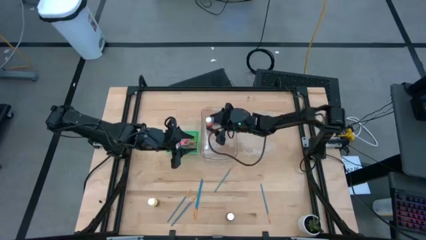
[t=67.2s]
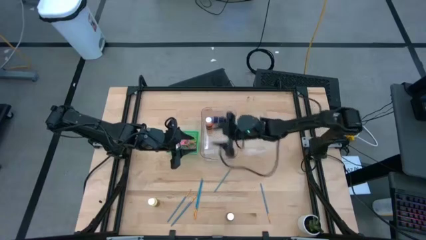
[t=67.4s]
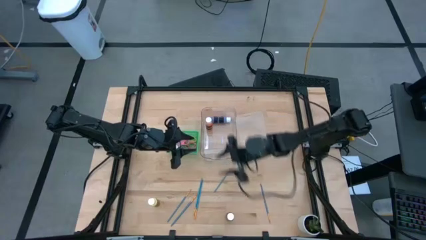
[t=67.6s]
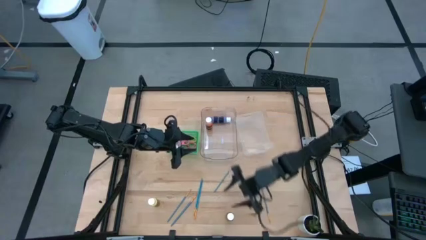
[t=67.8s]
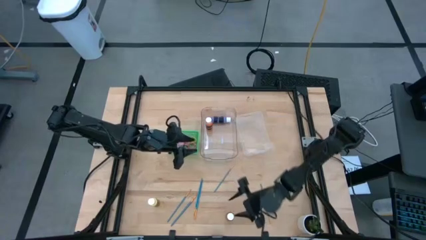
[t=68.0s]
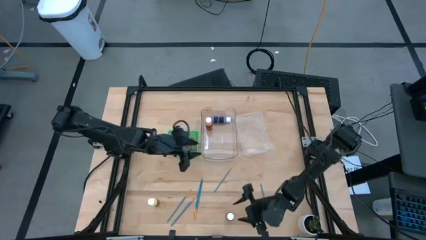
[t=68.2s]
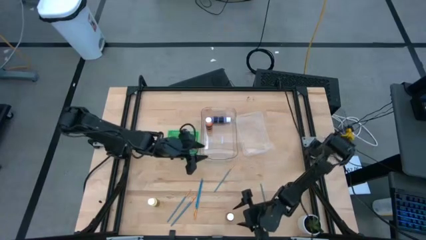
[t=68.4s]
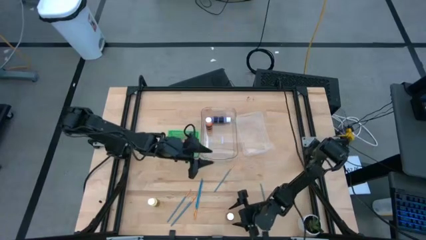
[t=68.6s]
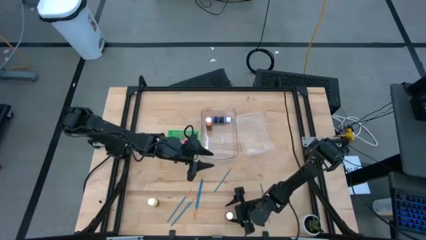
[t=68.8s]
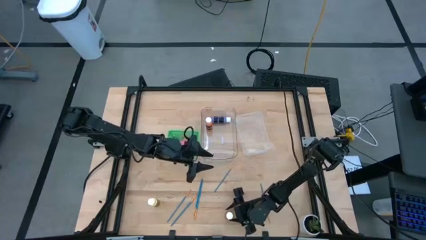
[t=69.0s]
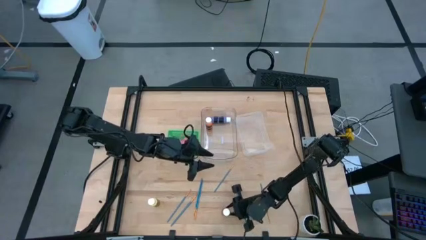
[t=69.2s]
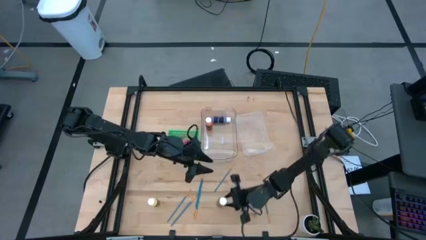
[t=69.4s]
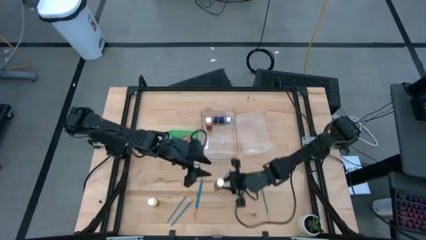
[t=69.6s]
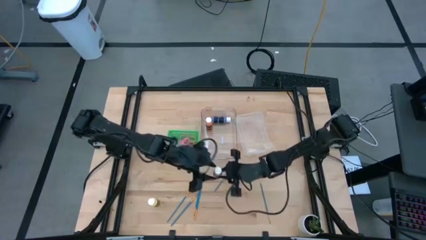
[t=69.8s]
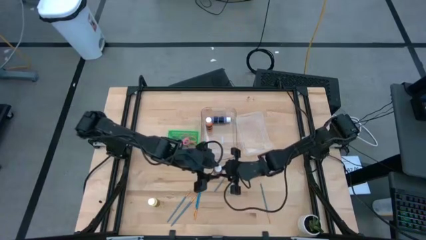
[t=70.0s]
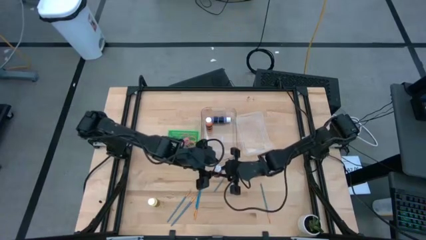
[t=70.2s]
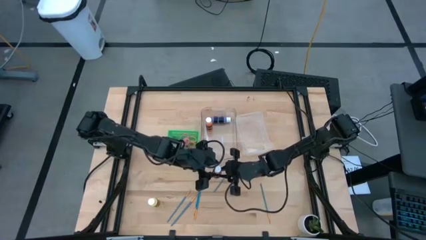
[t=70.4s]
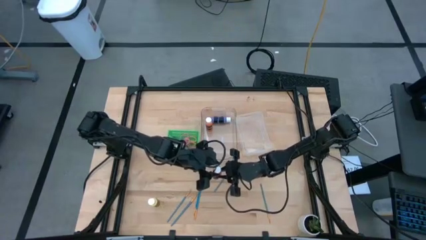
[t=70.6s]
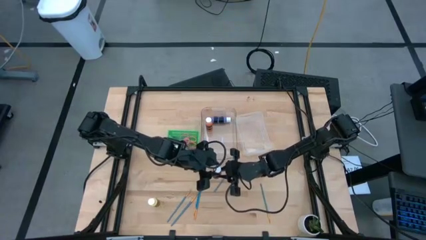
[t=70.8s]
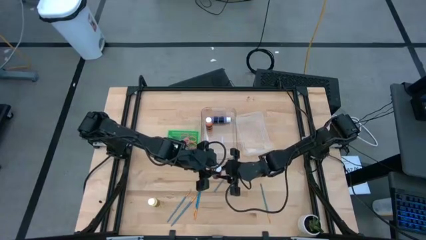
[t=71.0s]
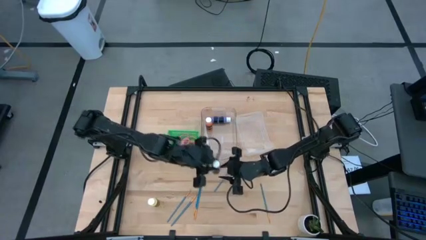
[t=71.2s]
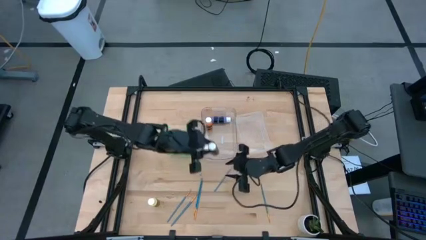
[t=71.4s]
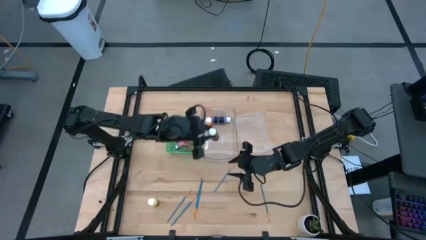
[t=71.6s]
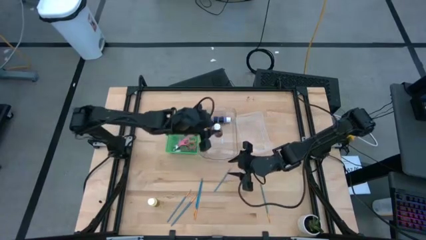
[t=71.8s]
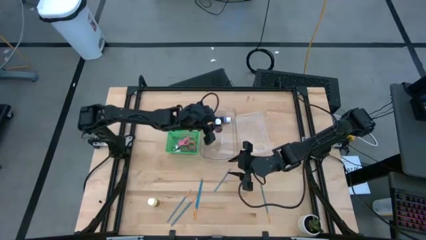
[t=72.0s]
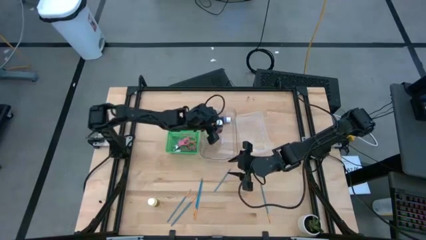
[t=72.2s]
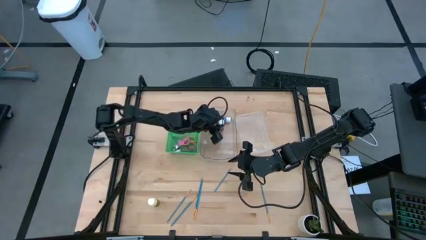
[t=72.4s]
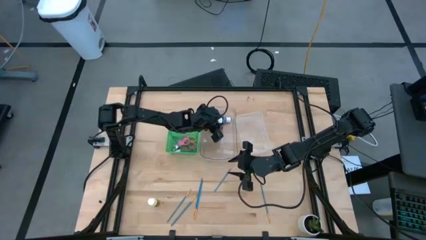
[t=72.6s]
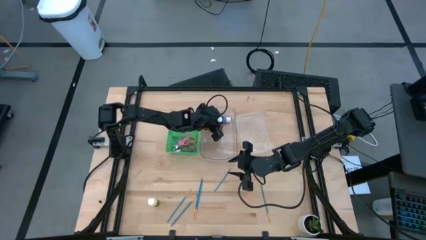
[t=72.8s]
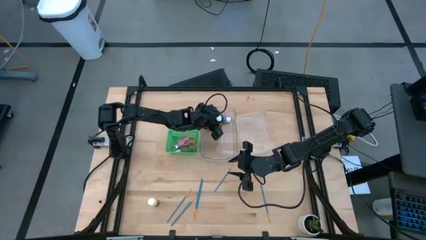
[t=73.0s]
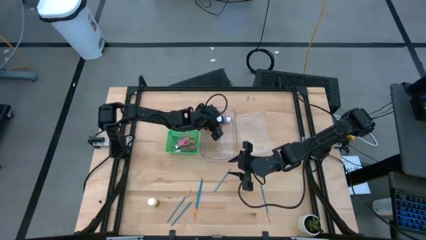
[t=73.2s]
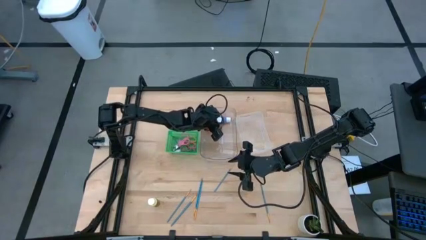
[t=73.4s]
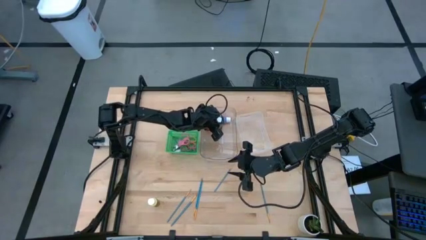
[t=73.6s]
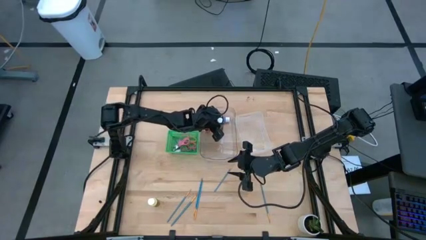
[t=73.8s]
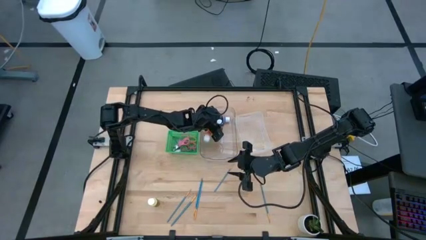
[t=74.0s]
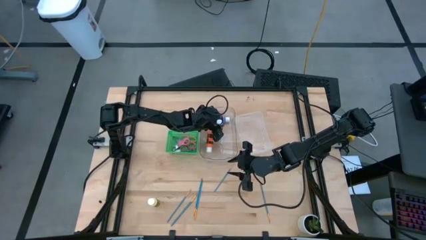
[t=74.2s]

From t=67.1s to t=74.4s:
Task: Pick & Place Paint Supplies
Put the brown paint bottle into the transparent bin

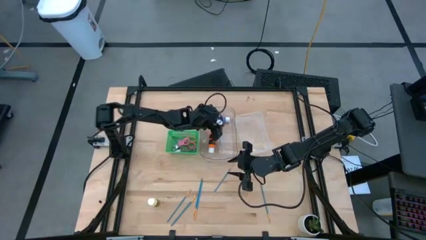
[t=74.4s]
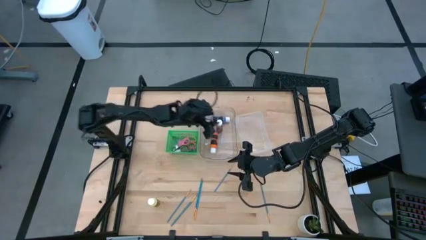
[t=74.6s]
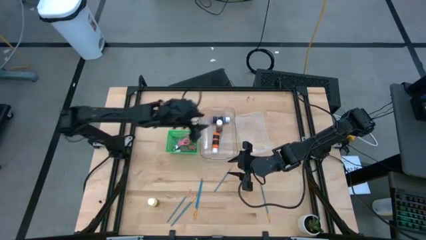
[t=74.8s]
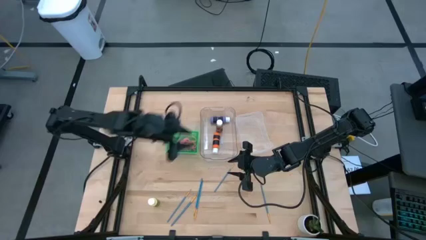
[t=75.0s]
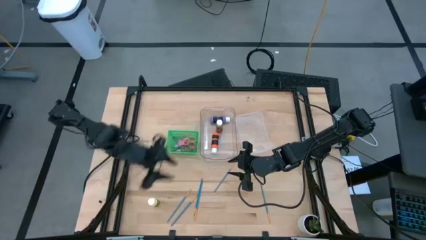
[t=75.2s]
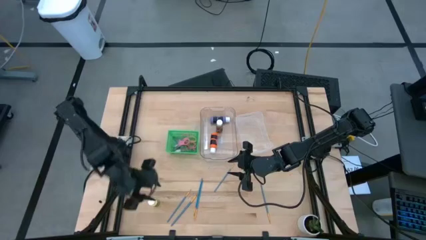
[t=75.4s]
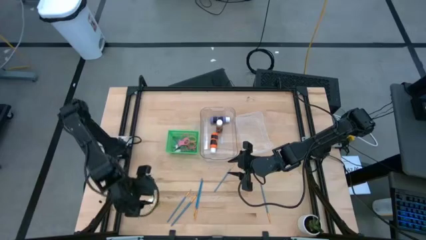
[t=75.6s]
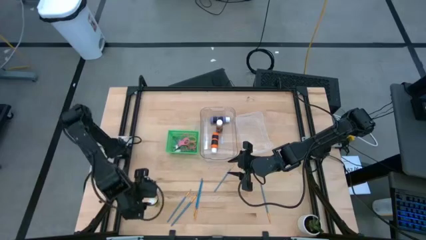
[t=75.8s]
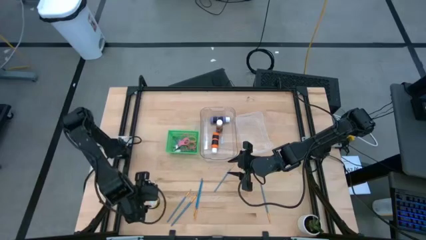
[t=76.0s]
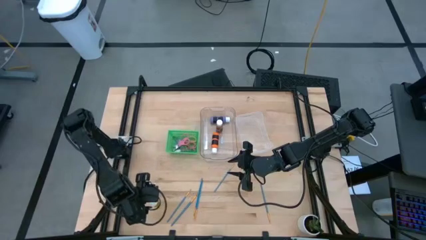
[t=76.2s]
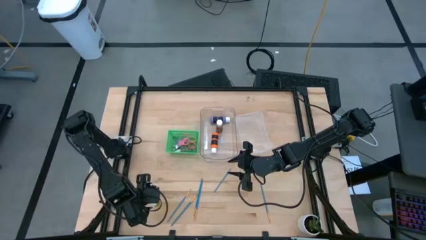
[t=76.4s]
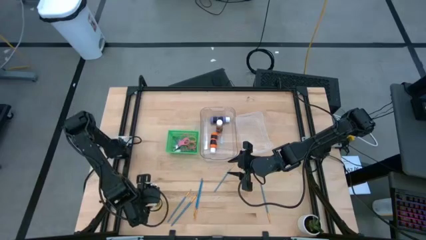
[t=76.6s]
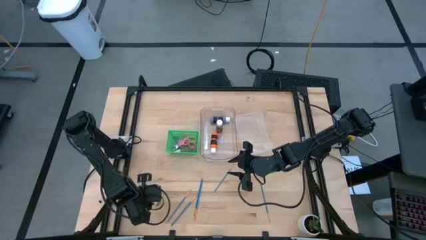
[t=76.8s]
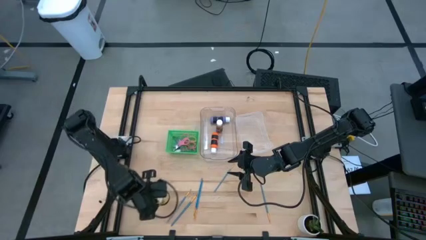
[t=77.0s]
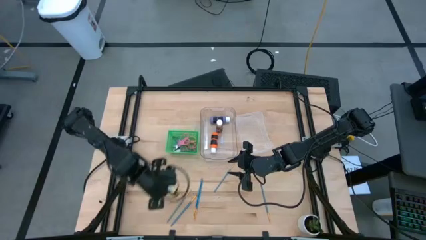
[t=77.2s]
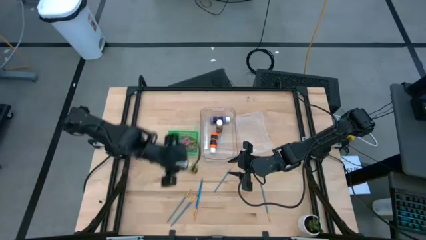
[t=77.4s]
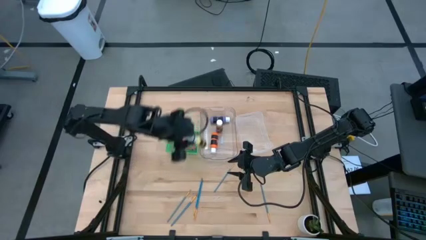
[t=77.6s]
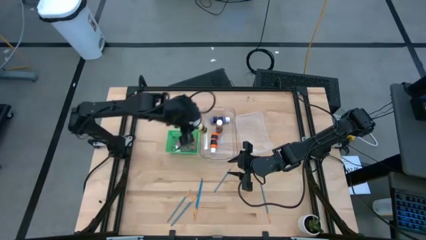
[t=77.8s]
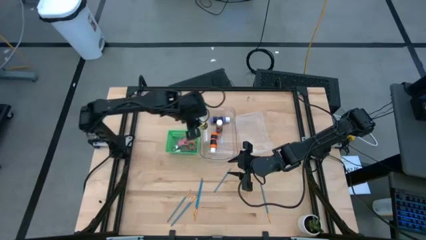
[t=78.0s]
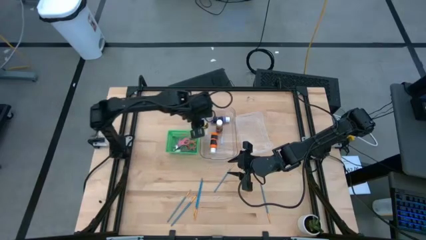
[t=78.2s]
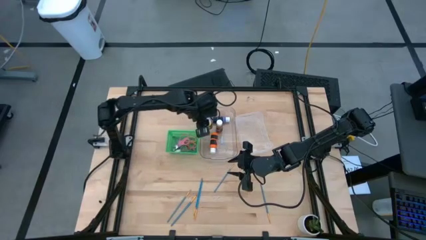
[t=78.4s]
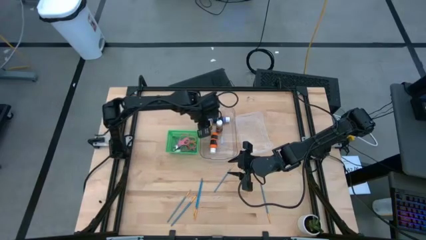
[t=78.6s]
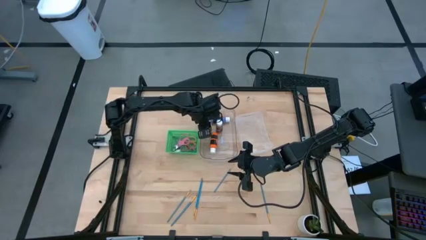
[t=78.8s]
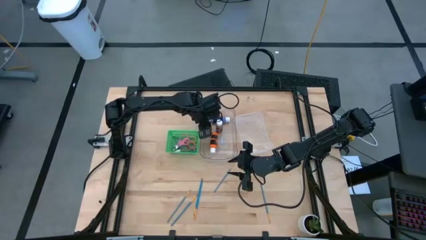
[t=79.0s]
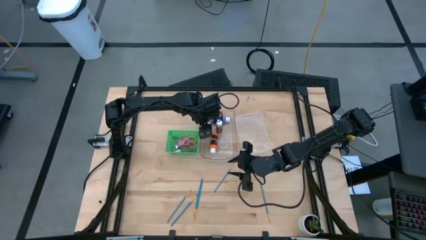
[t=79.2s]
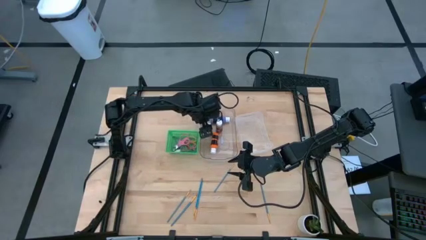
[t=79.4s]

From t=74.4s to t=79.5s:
Put the yellow paint bottle into the transparent bin

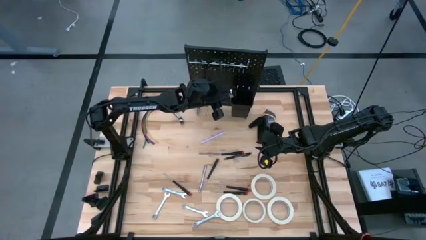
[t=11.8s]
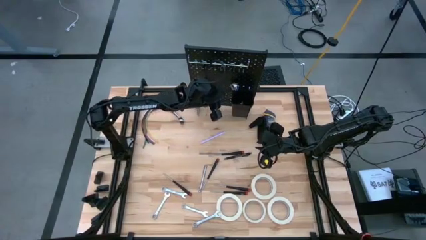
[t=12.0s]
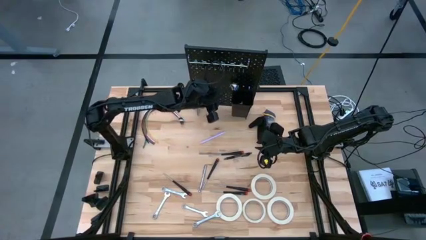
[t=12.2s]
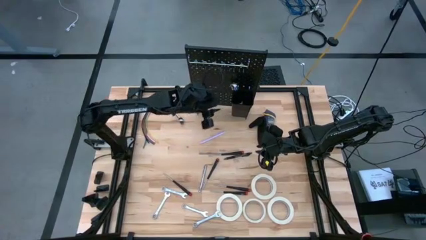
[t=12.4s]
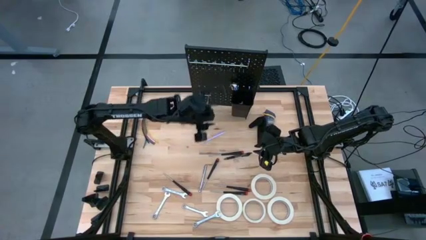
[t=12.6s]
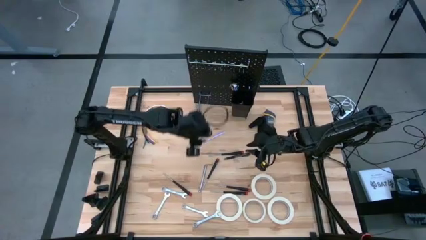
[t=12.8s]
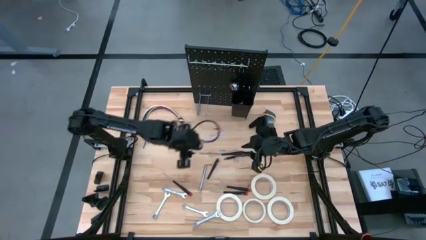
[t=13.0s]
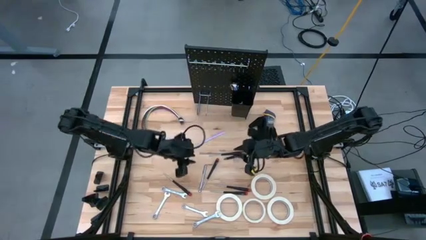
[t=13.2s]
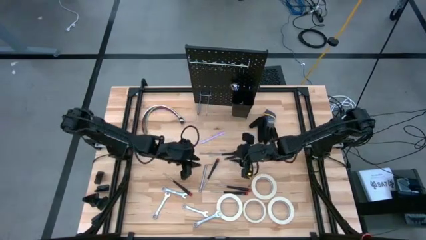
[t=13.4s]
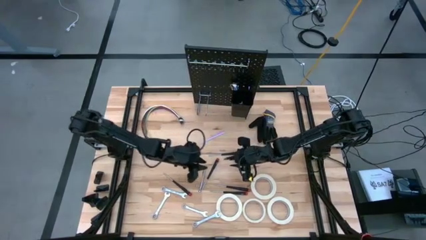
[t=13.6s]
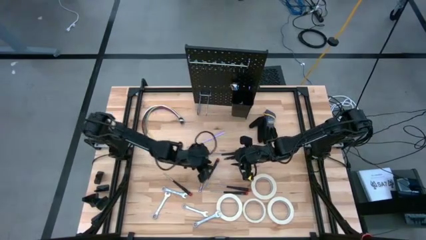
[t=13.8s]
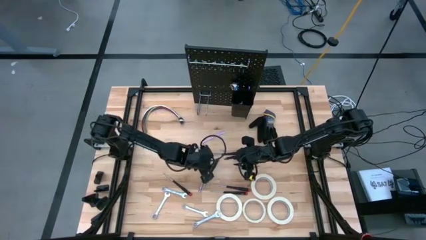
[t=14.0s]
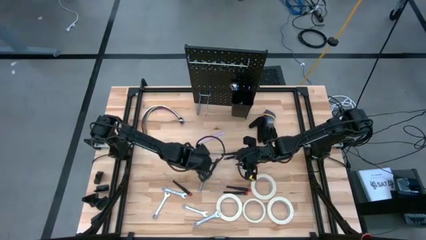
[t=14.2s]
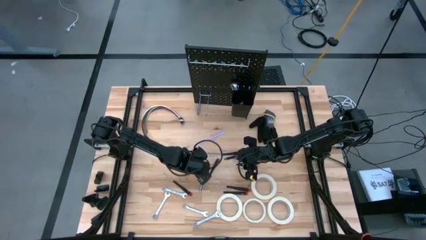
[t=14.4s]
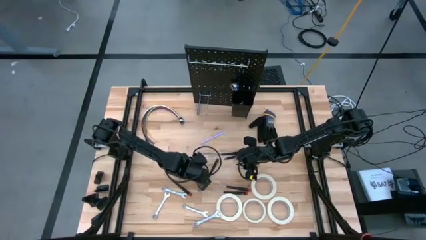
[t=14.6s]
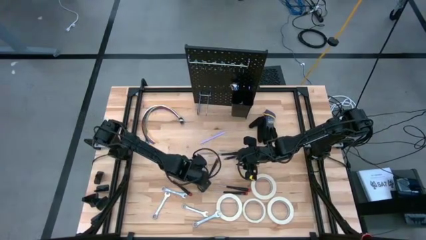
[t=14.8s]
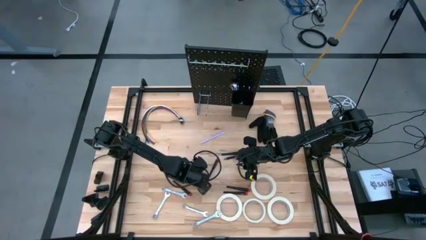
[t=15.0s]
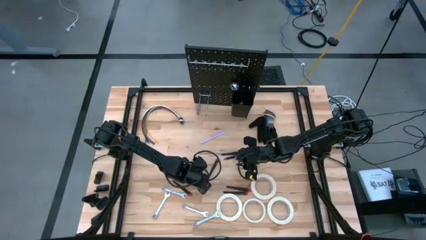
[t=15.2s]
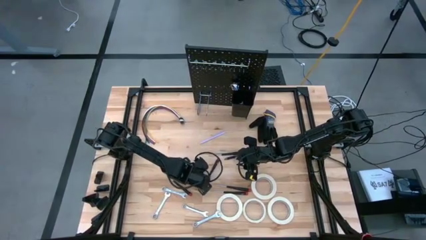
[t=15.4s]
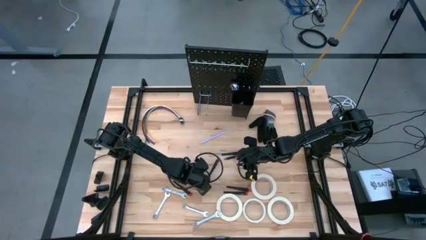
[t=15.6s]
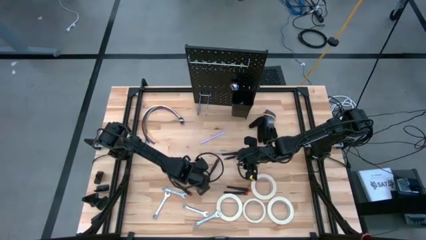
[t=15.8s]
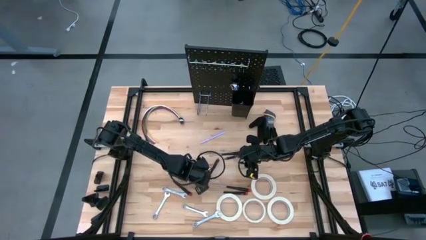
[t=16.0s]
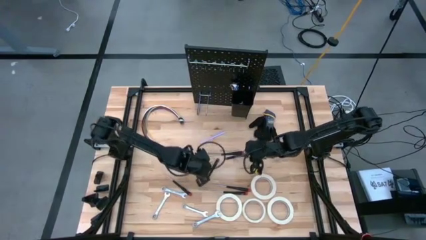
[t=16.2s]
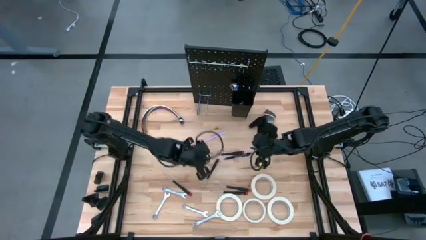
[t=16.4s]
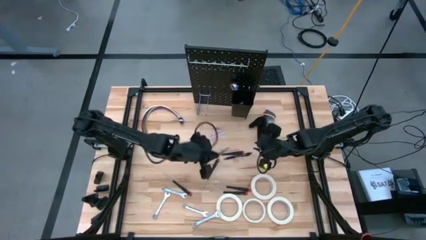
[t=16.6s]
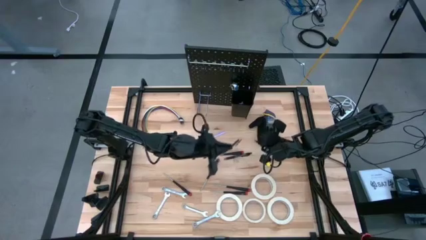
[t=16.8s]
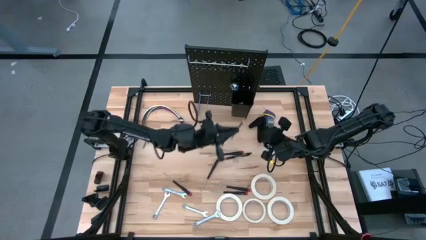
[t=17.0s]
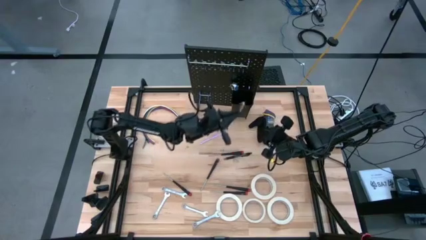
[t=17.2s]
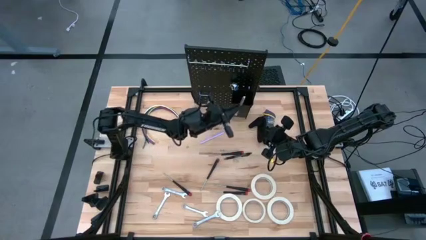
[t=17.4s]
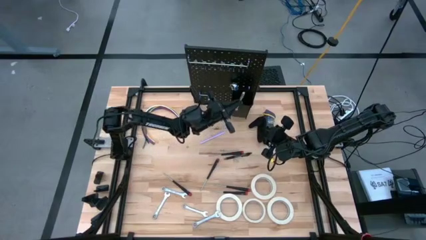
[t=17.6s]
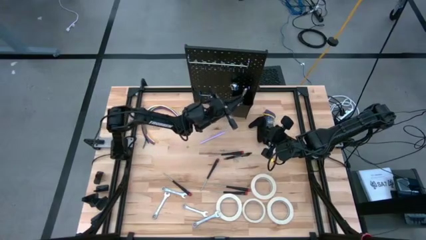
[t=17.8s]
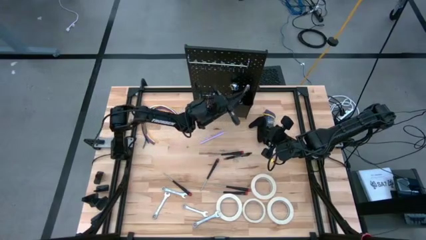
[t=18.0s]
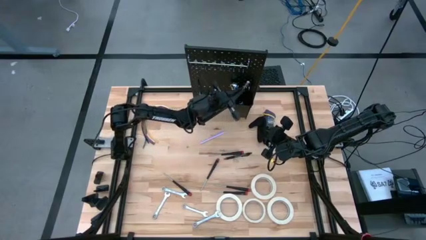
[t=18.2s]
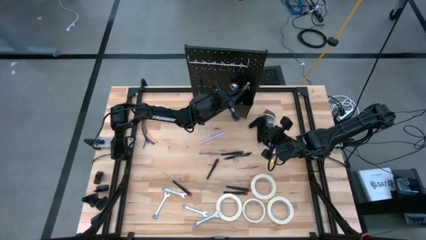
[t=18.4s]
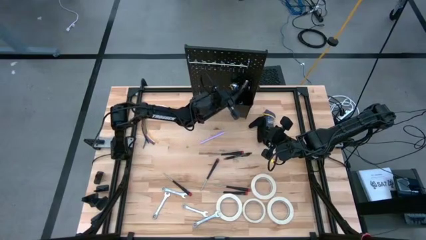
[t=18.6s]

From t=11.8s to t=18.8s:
Task: Hang tools onto peg board
Put the silver pen into the black bin on the peg board
